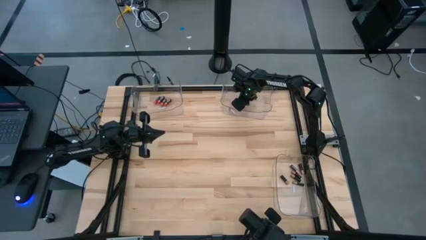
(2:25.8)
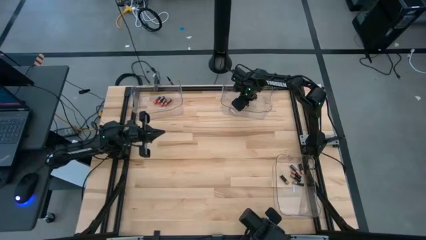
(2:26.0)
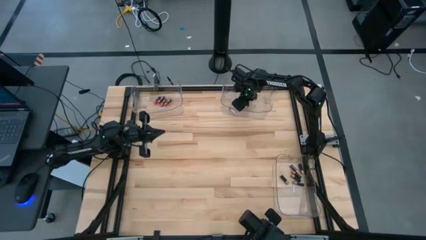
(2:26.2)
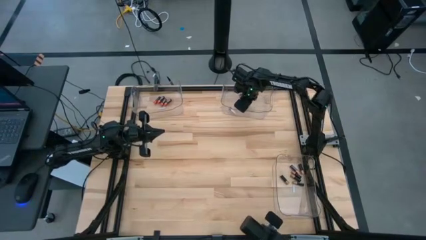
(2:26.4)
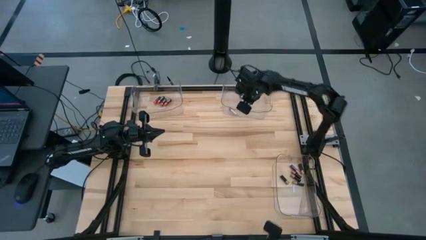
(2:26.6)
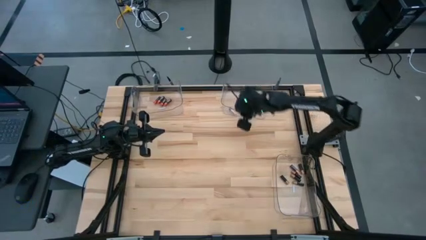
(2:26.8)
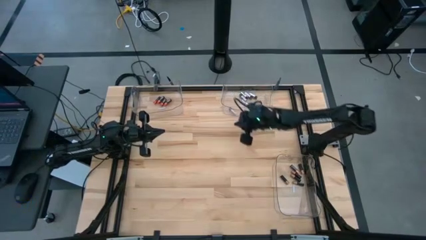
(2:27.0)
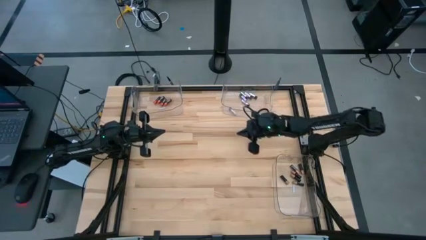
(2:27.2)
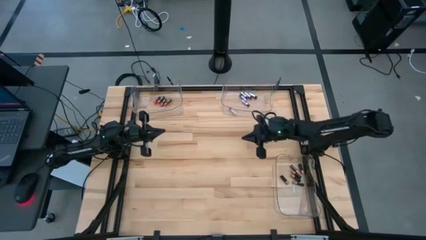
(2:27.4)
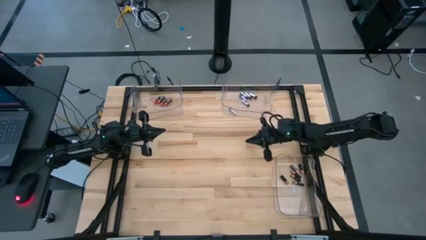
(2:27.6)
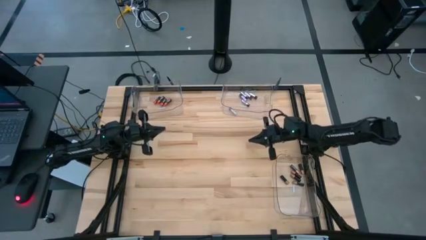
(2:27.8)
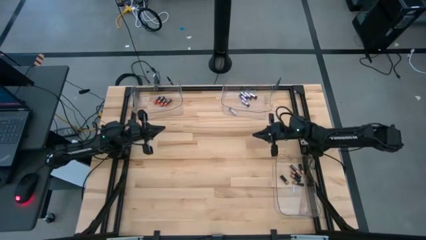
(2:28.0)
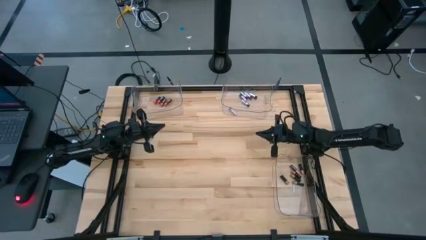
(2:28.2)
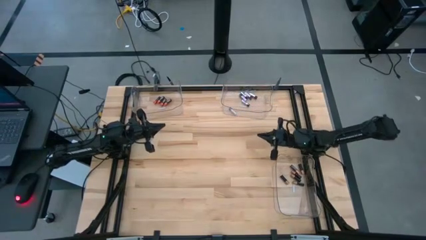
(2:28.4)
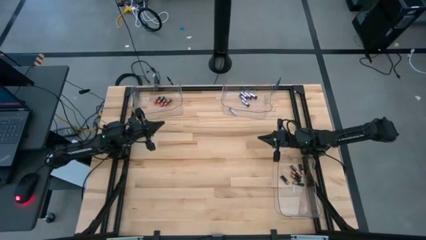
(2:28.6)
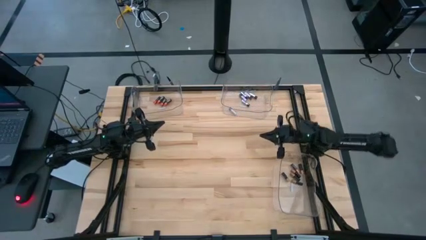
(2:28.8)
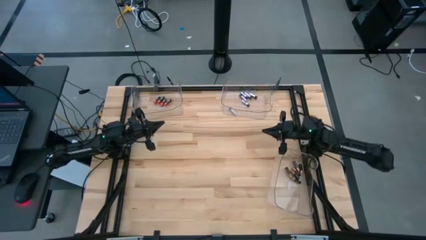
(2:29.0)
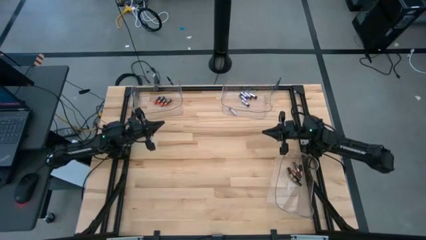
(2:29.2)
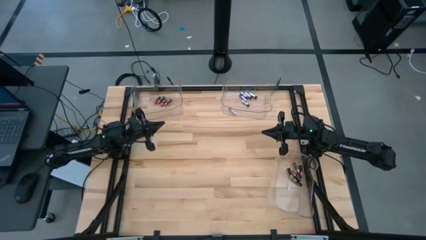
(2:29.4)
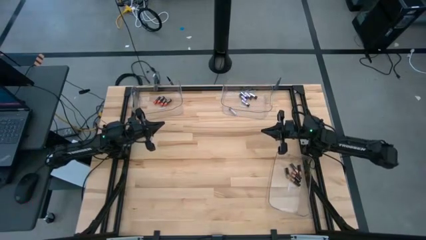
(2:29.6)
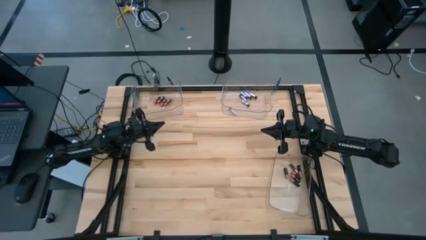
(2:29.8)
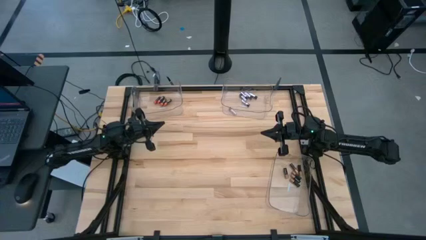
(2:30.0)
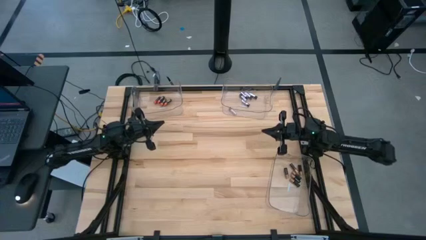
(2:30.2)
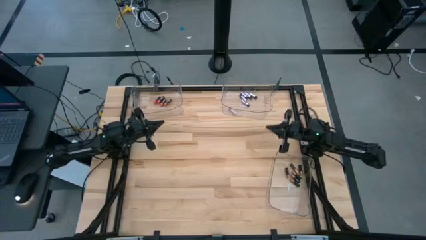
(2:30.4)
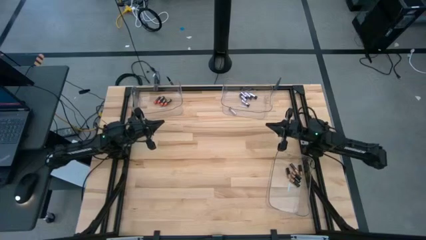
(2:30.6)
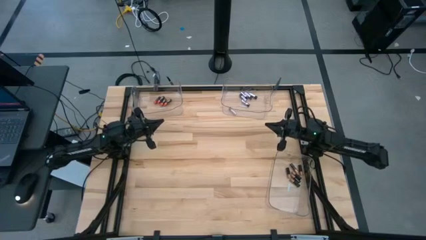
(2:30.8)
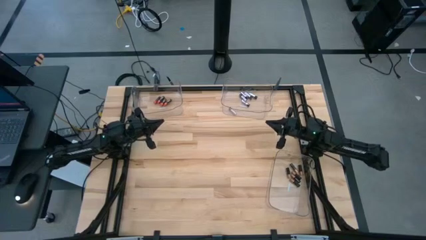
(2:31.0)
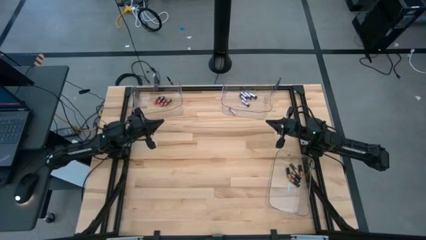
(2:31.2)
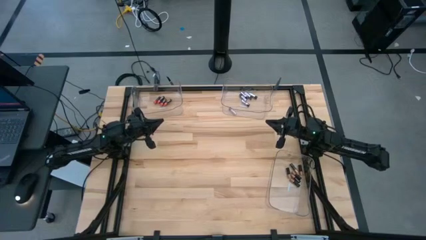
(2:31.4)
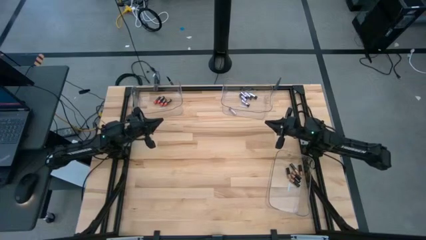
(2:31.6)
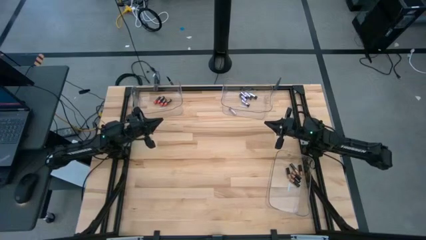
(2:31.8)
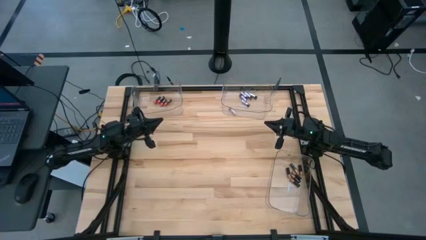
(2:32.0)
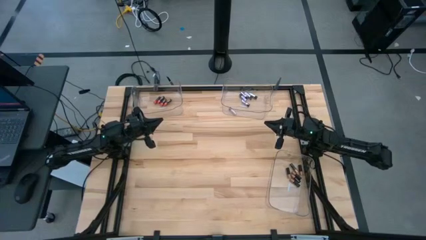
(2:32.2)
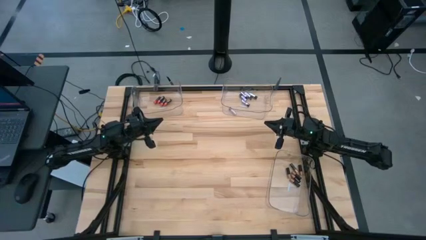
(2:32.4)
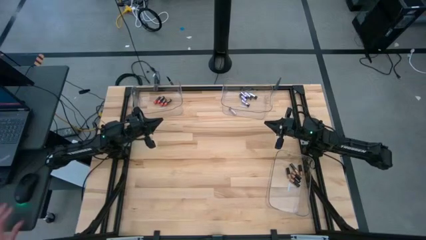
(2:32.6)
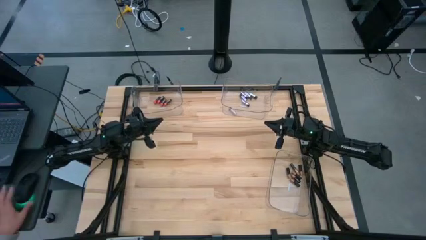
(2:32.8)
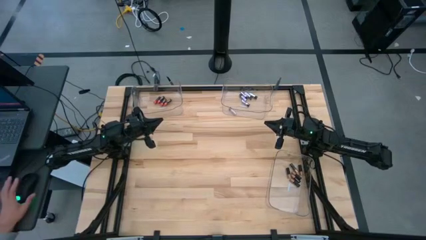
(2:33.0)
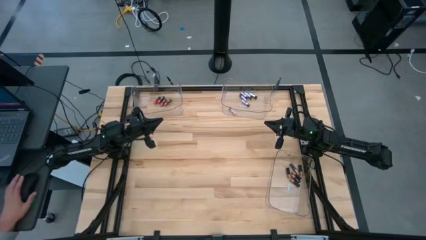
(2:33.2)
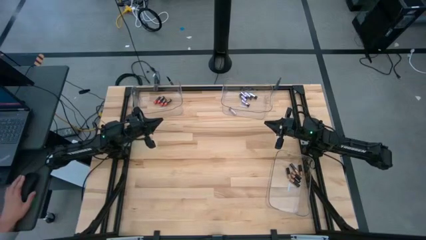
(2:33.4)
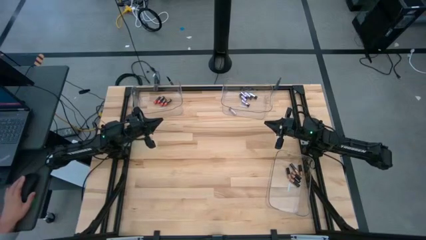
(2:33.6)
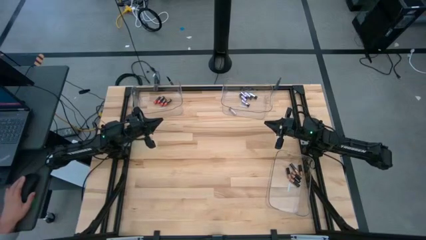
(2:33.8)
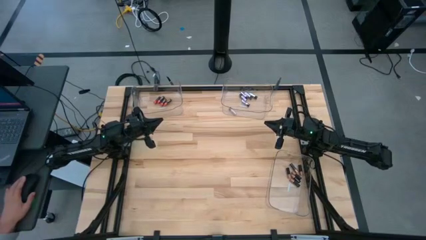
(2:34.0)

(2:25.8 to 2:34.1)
Task: Sort batteries
Return to Home Position

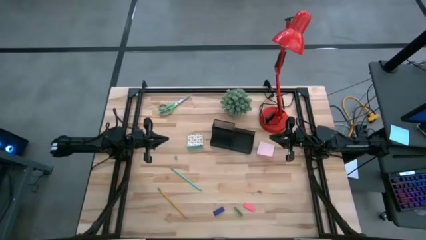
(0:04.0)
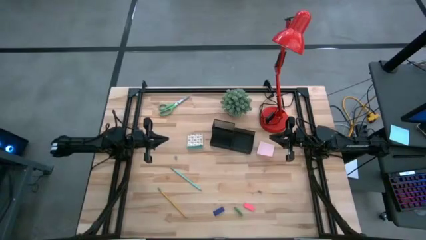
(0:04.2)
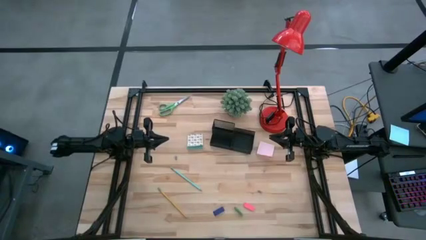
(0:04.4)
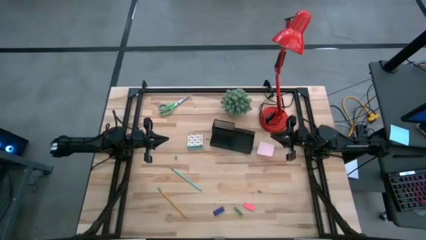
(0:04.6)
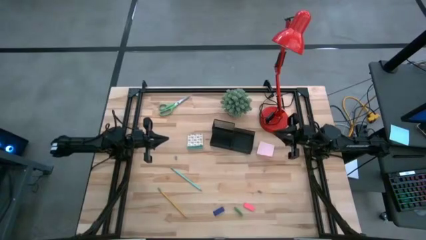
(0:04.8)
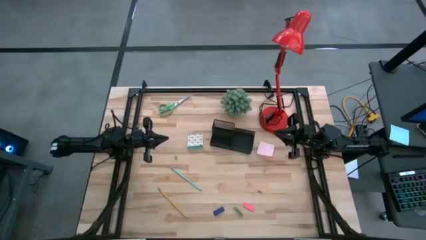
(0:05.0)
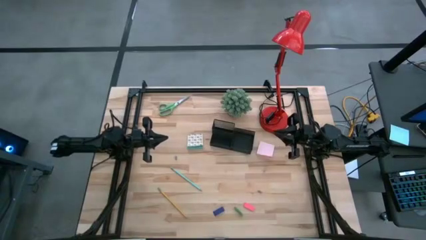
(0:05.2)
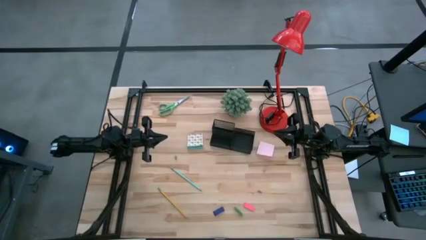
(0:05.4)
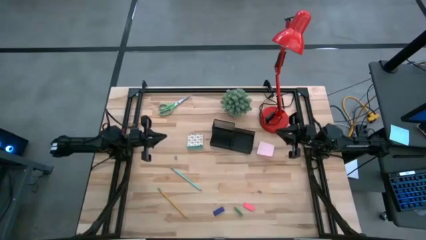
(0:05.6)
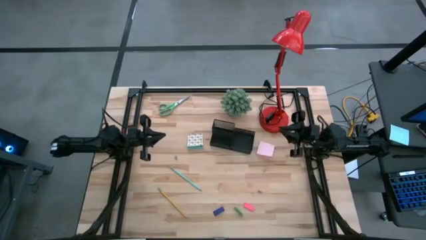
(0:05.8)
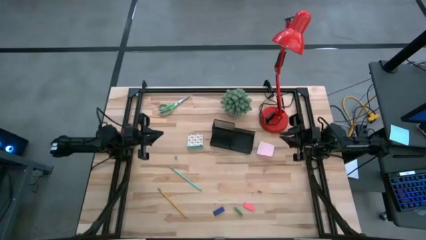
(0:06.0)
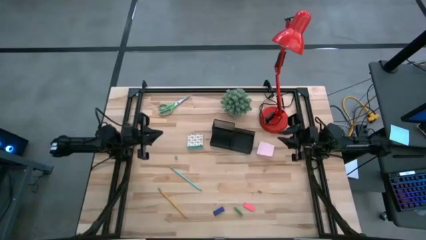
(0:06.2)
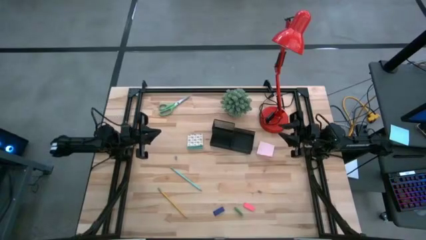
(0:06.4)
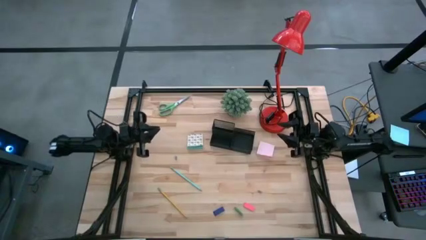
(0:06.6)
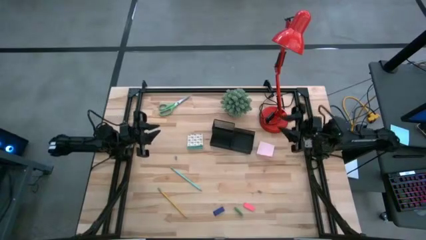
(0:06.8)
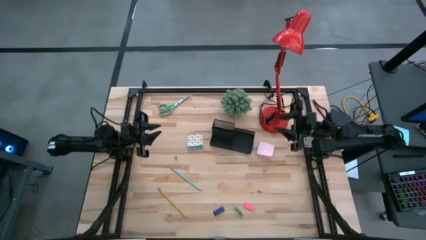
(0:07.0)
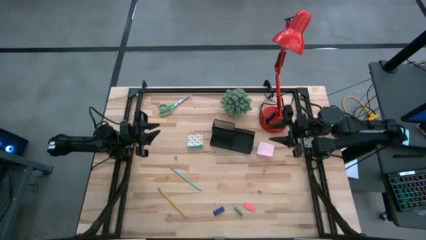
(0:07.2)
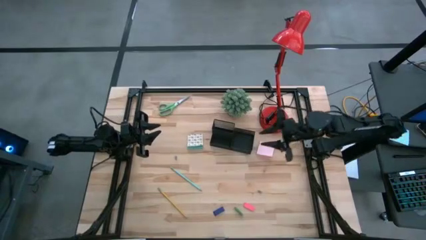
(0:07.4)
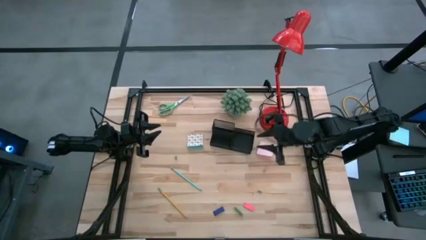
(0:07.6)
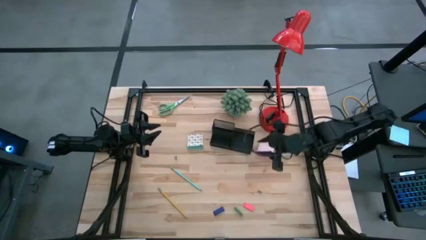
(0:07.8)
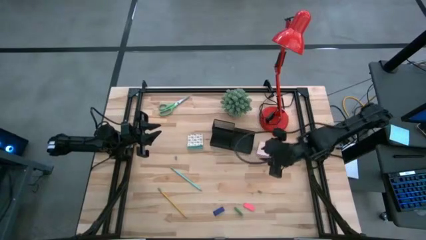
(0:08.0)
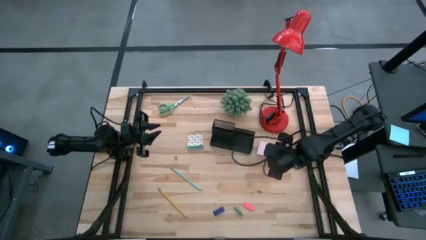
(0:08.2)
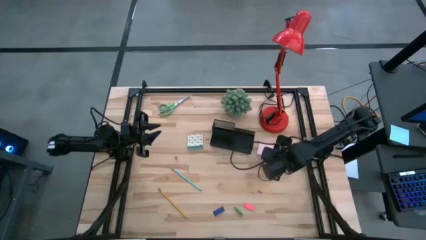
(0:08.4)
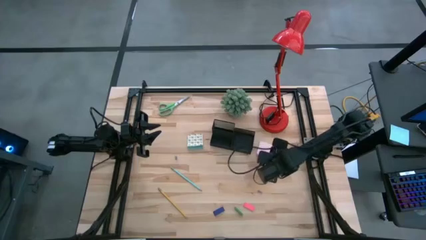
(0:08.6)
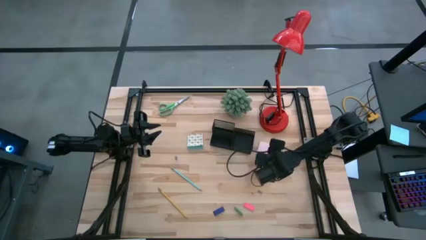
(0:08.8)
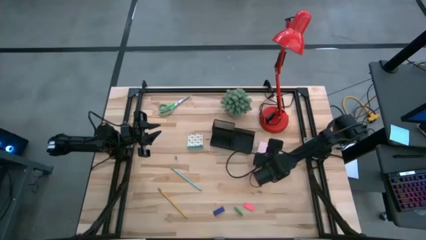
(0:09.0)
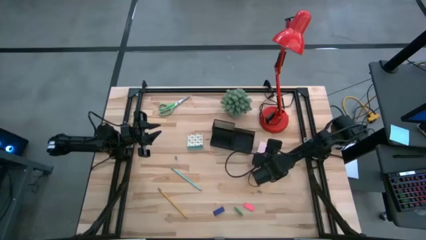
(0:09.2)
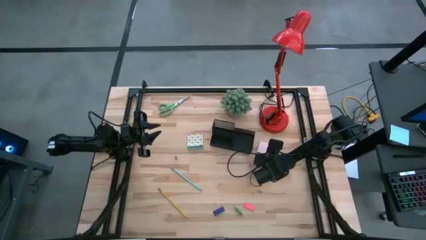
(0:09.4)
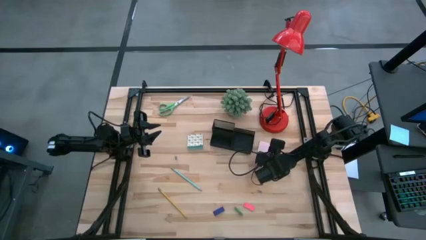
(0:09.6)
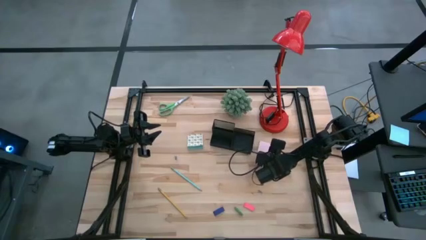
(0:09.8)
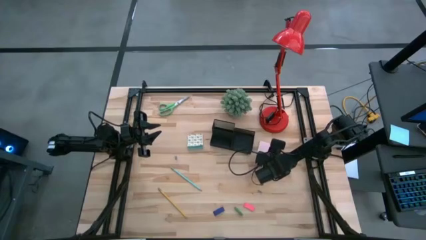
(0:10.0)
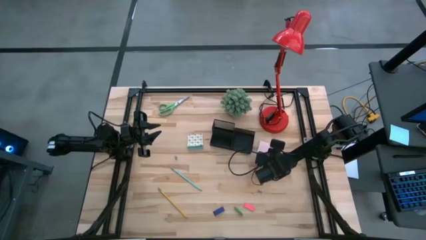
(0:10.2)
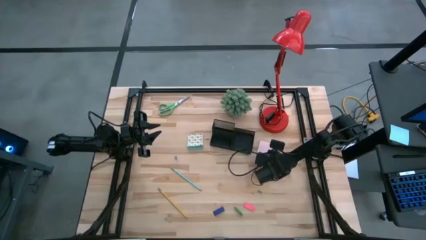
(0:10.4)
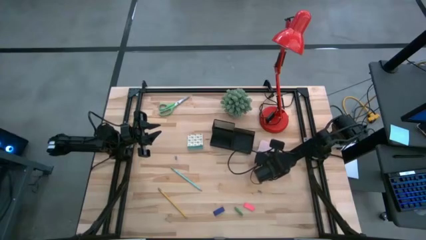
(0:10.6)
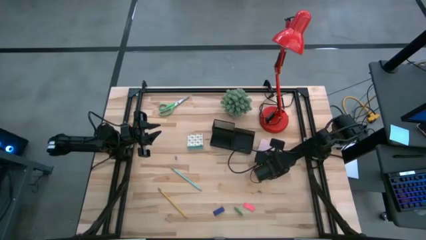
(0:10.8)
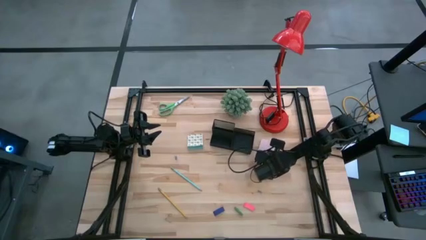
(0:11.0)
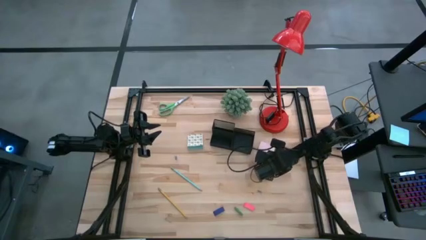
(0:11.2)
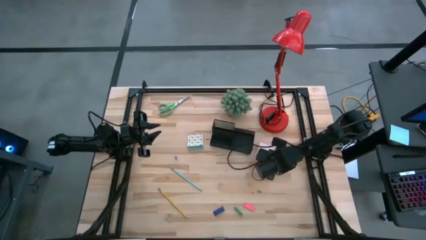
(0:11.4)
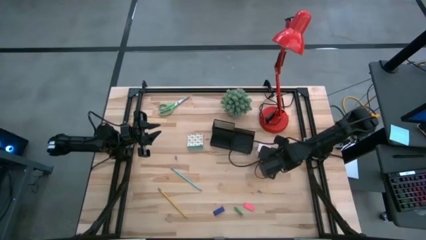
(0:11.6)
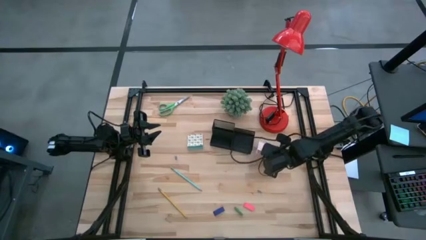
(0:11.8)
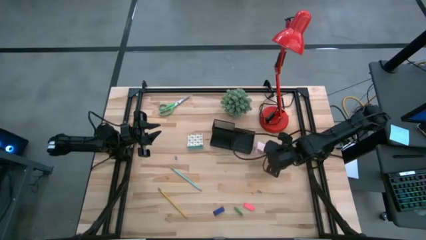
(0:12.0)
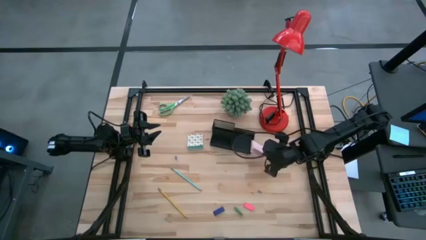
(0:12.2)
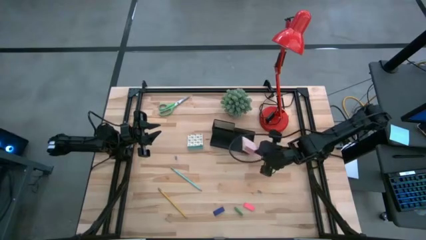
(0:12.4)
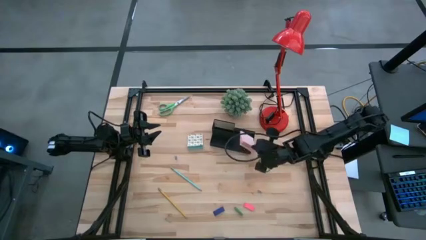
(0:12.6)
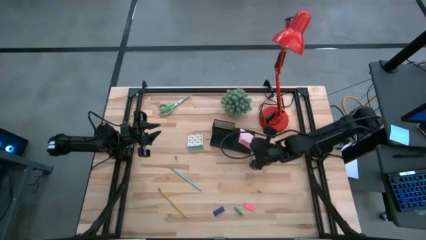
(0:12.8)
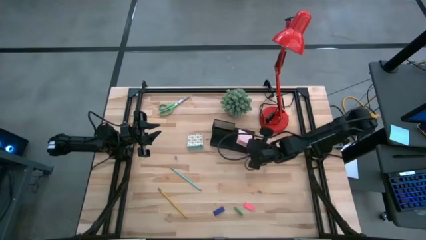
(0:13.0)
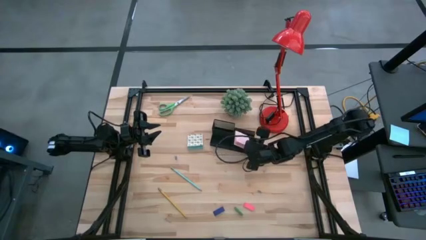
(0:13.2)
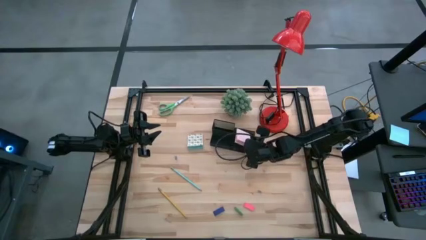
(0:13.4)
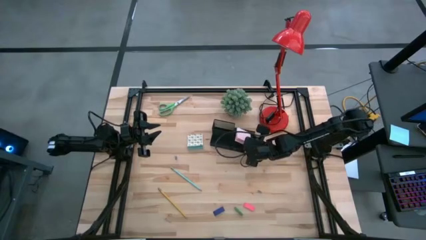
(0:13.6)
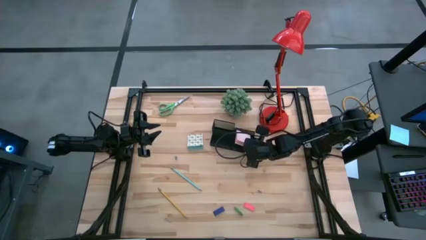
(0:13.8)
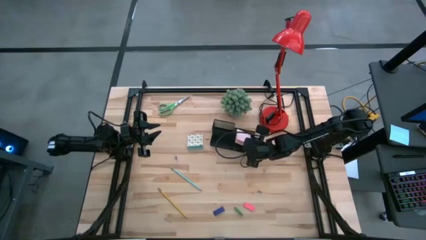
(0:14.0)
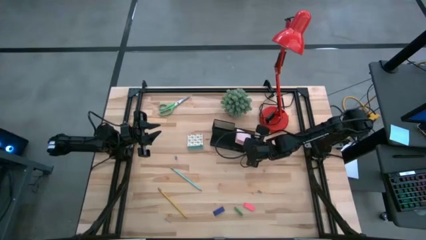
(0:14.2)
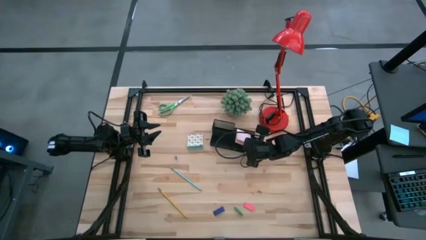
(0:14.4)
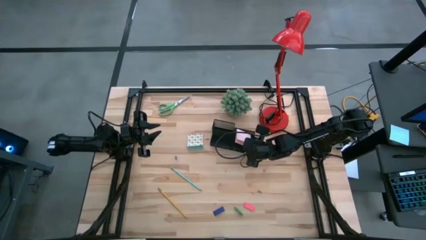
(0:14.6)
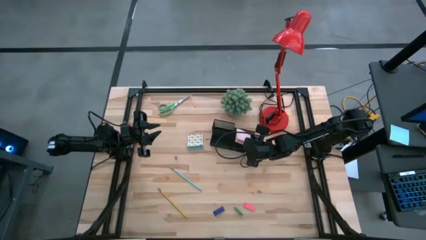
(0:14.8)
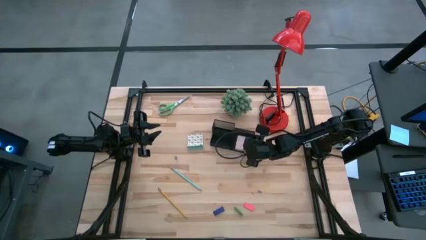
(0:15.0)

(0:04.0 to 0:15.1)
Task: Pick and place office supplies into organizer
Put the pink sticky notes into the black desk organizer
